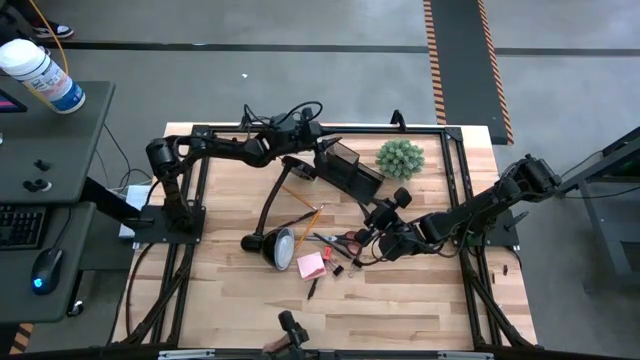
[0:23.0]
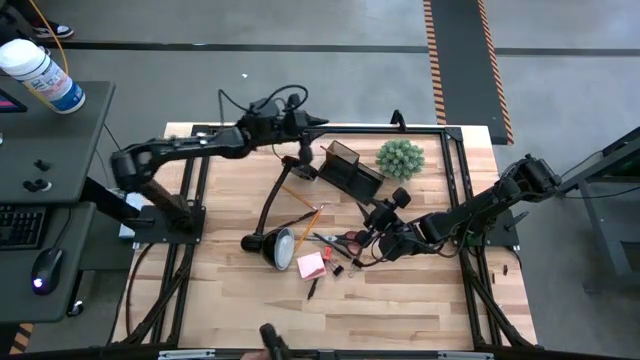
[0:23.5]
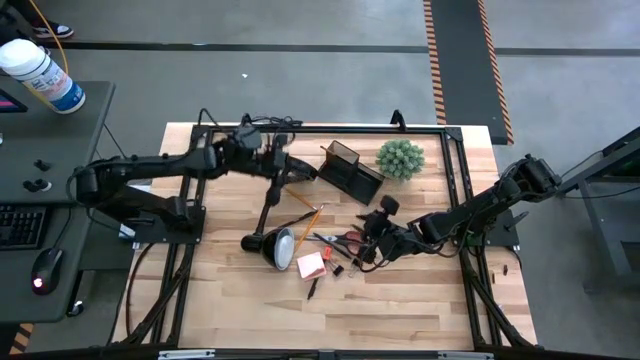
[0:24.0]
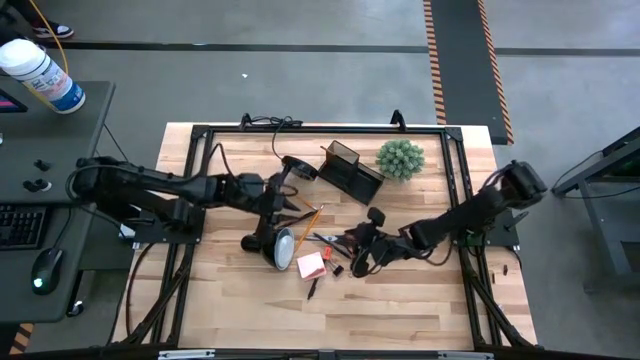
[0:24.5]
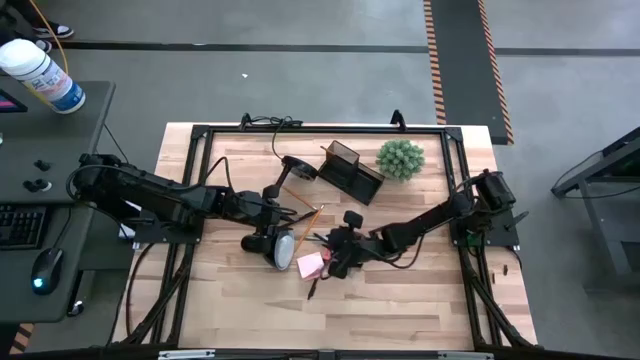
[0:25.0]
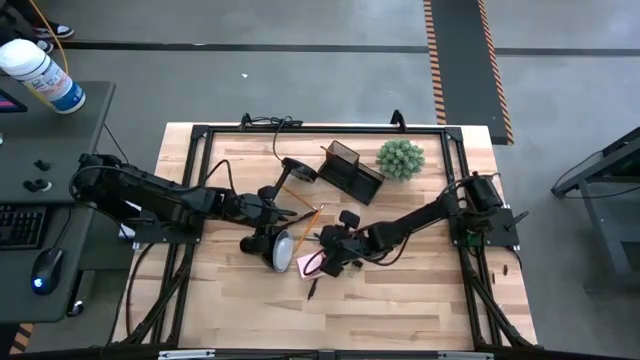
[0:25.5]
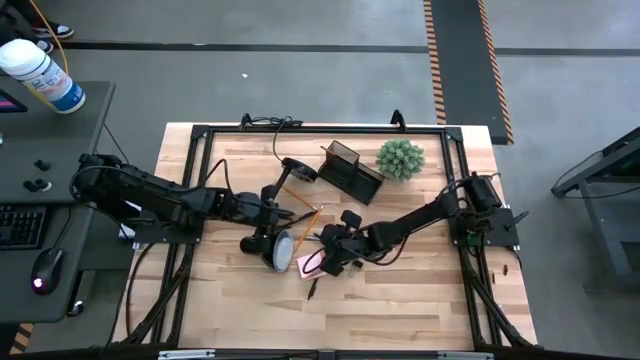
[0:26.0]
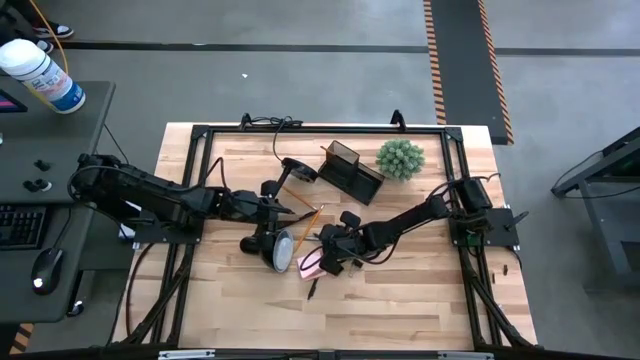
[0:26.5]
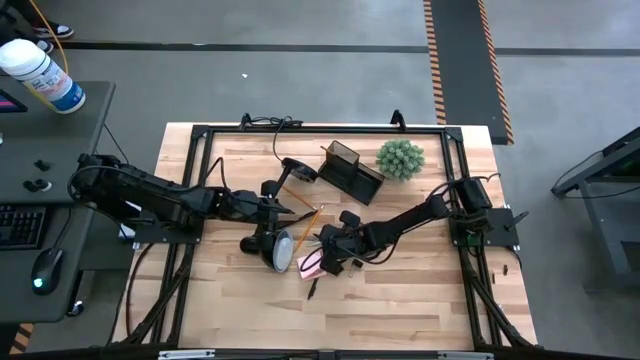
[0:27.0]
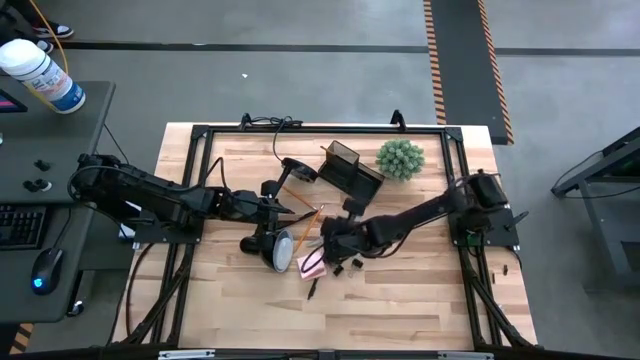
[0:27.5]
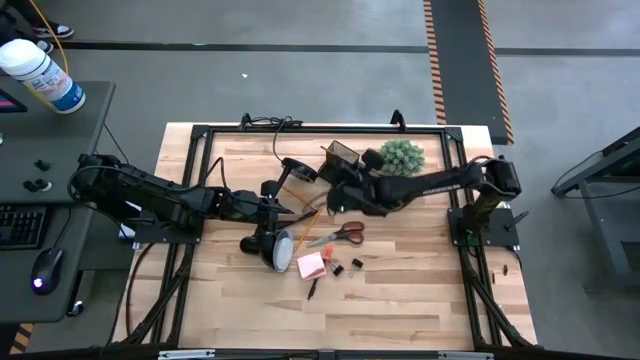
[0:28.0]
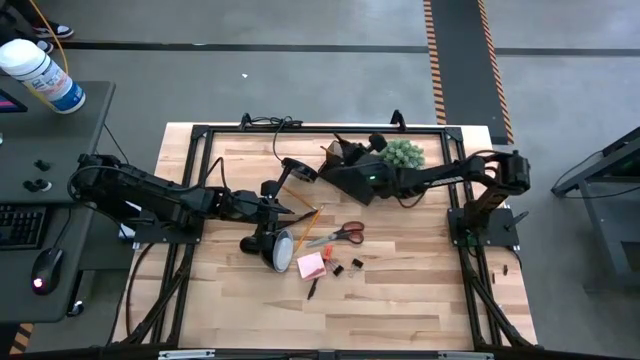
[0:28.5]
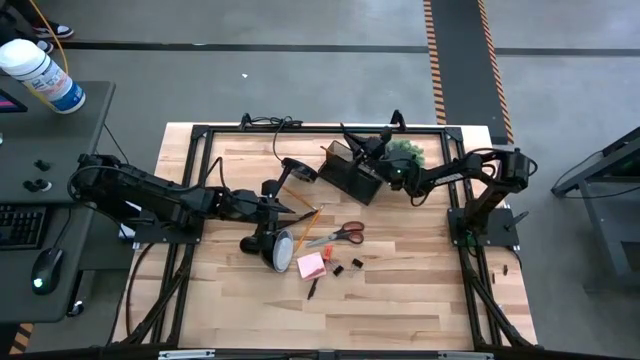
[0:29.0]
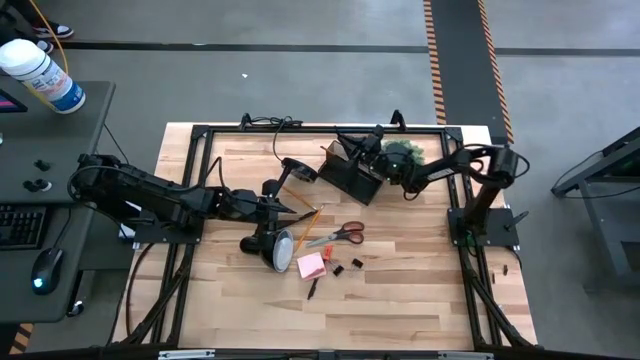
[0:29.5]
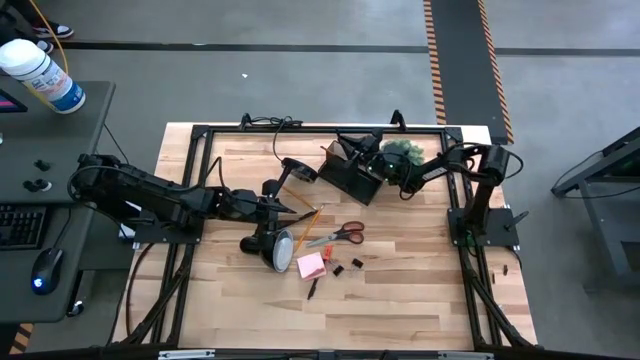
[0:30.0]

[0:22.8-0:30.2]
Task: Pick and place office supplies into organizer
Put the middle black pen into the desk organizer

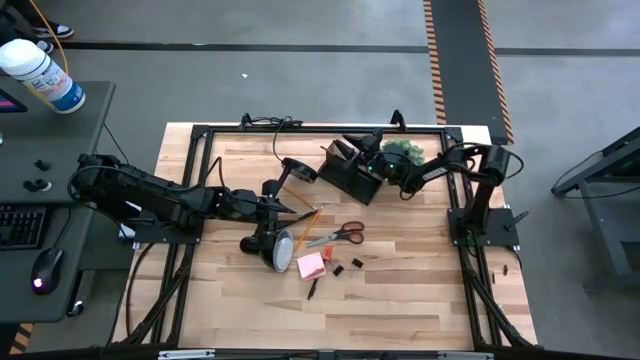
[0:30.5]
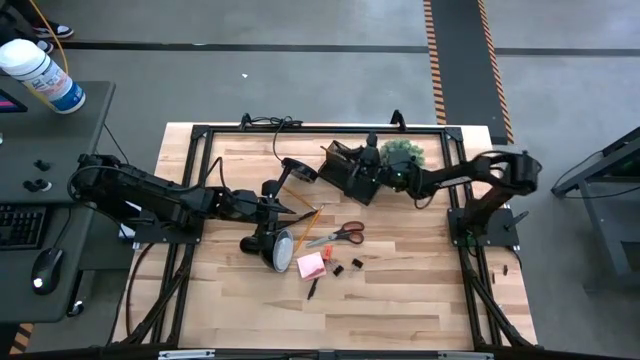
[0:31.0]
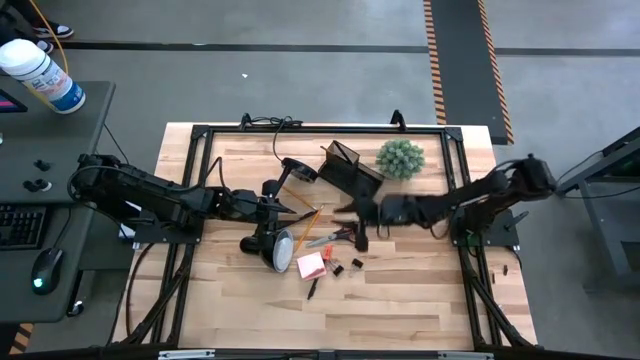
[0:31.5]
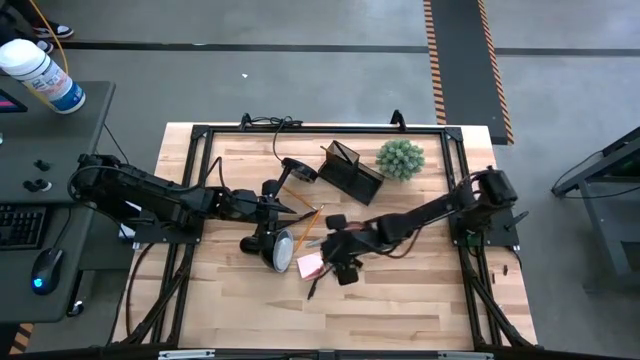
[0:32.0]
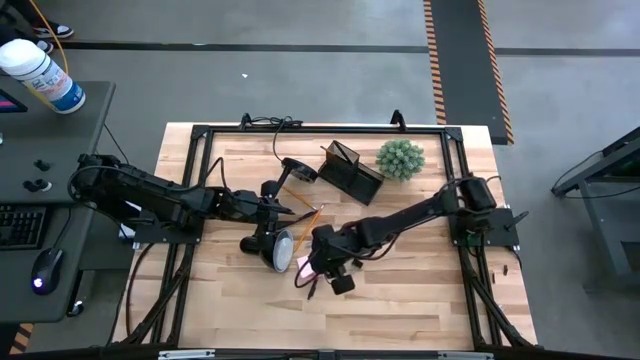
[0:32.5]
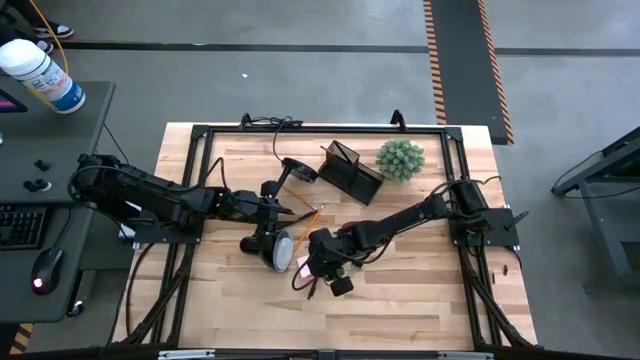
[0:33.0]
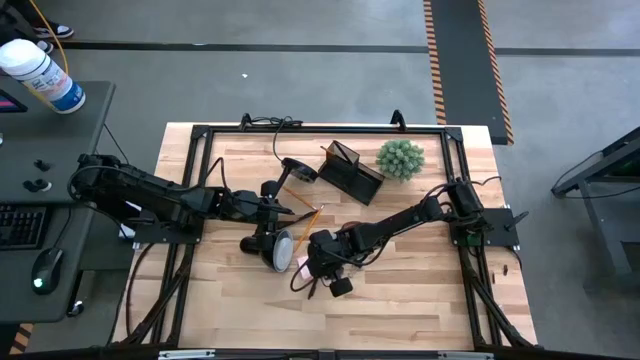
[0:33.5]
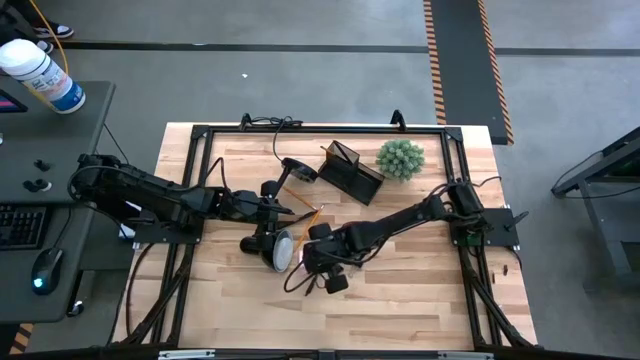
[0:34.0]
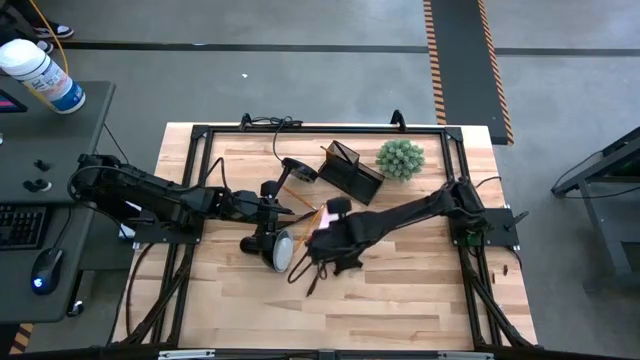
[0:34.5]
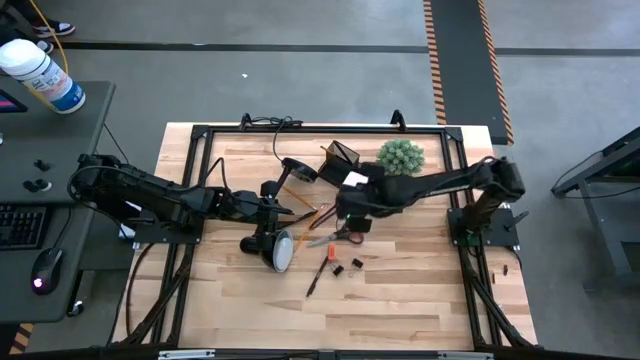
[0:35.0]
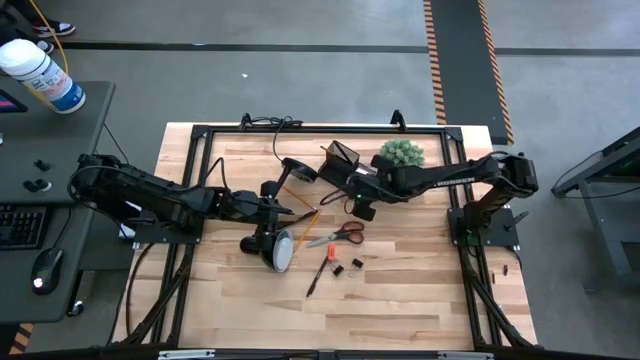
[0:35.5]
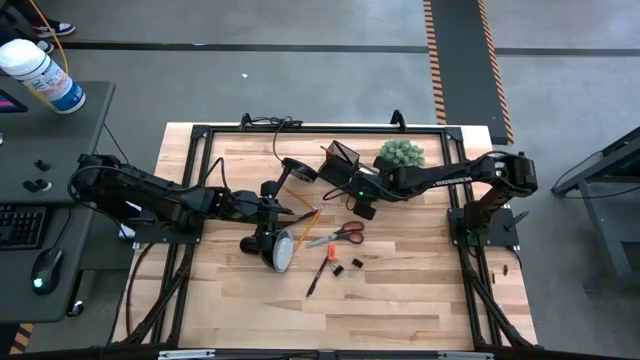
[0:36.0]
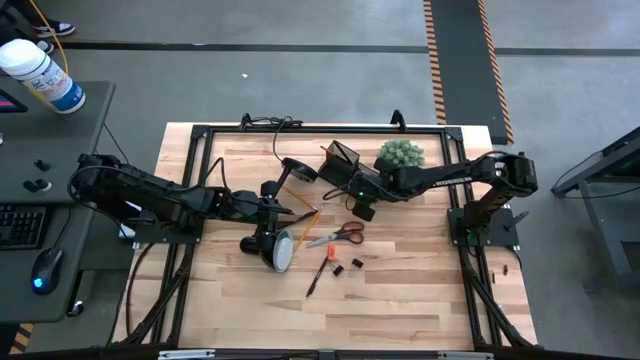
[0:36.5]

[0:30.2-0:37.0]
Put the sticky note into the desk organizer

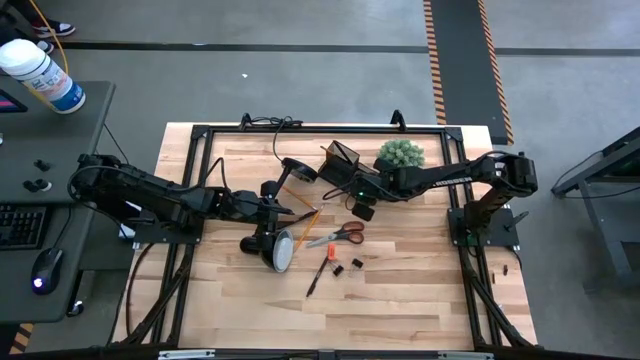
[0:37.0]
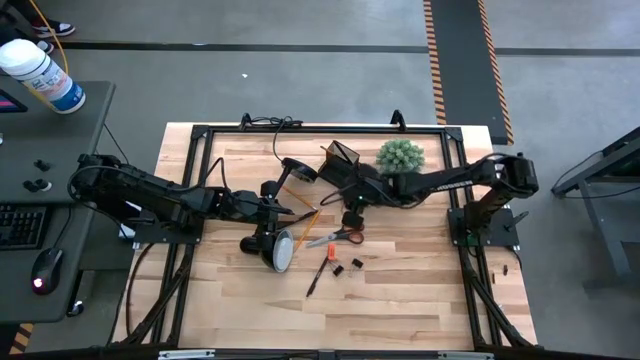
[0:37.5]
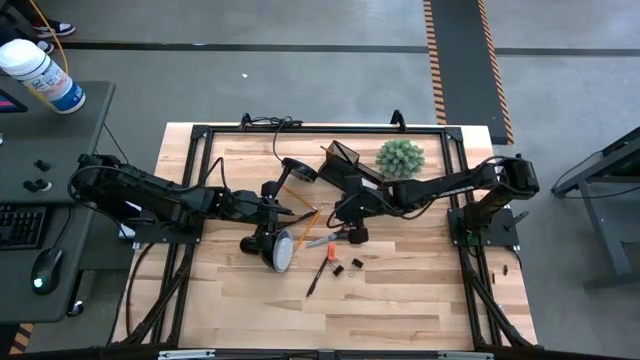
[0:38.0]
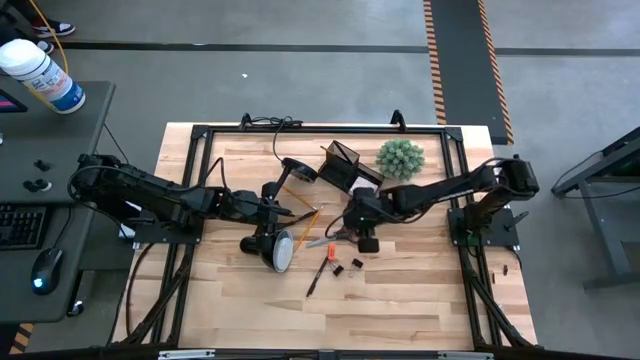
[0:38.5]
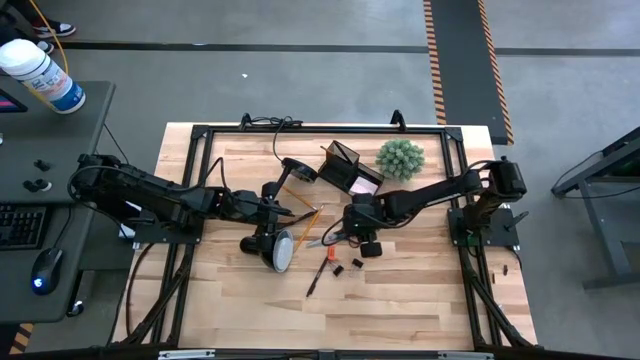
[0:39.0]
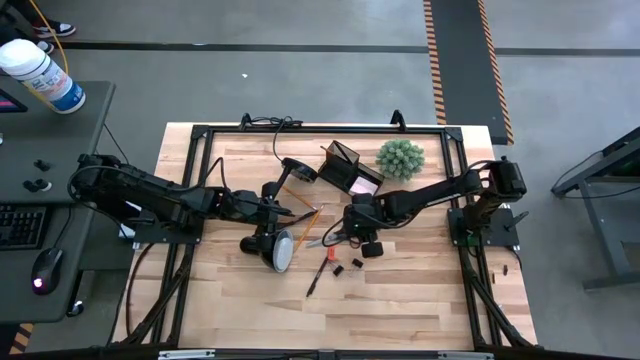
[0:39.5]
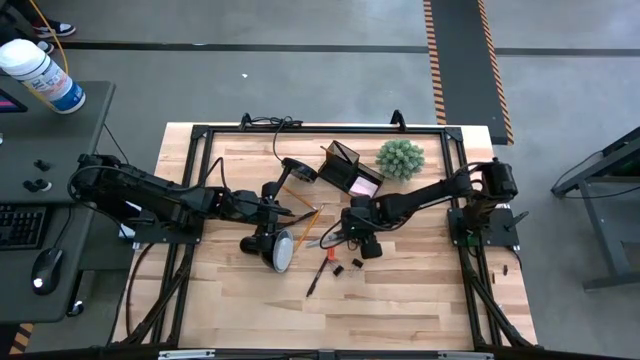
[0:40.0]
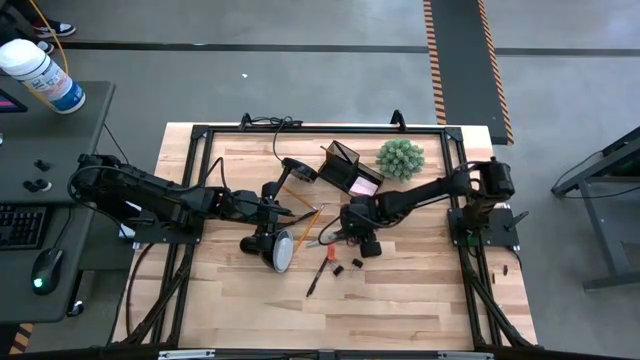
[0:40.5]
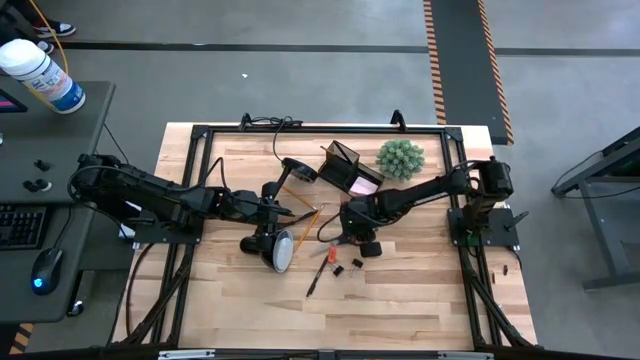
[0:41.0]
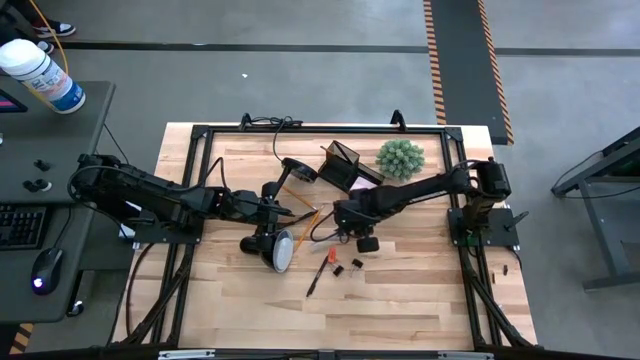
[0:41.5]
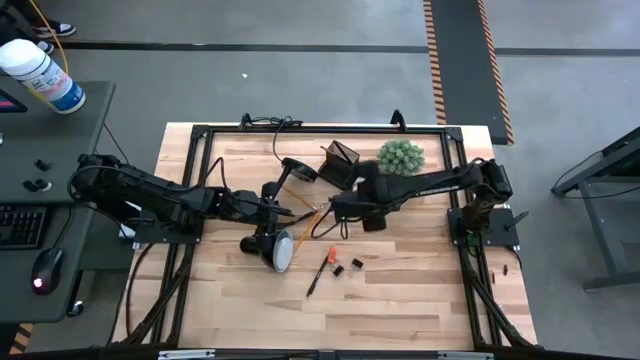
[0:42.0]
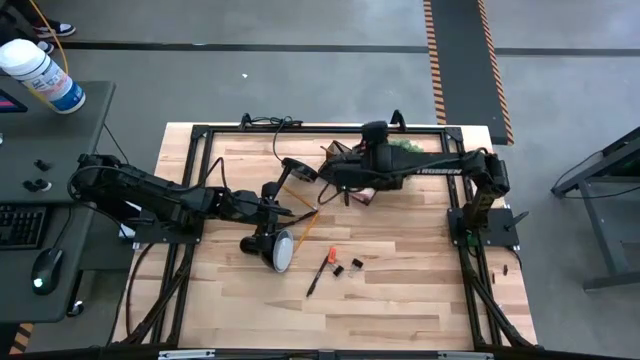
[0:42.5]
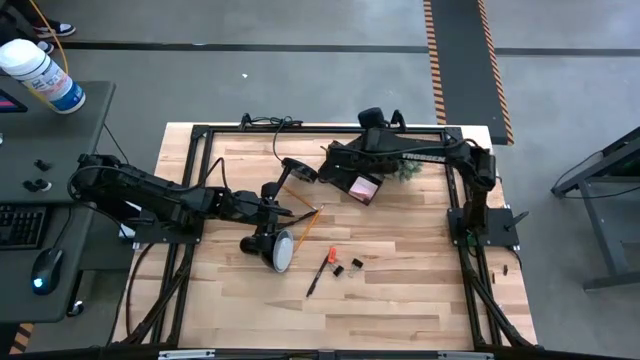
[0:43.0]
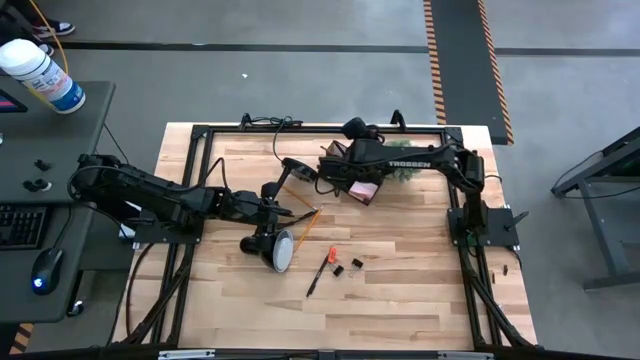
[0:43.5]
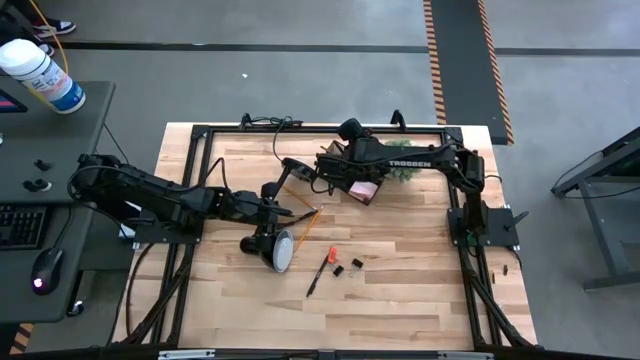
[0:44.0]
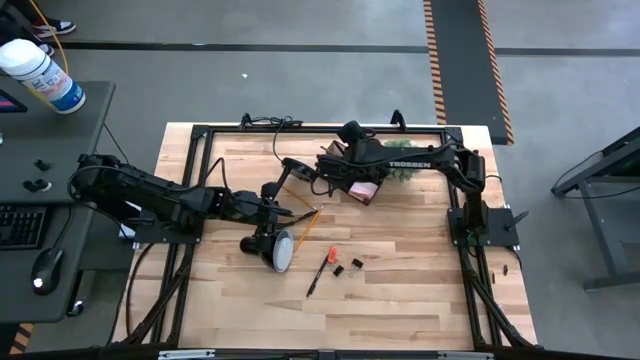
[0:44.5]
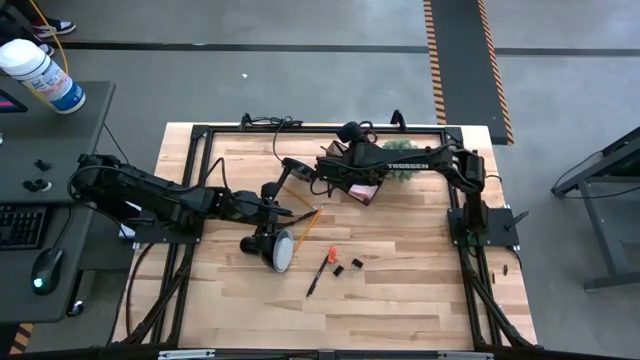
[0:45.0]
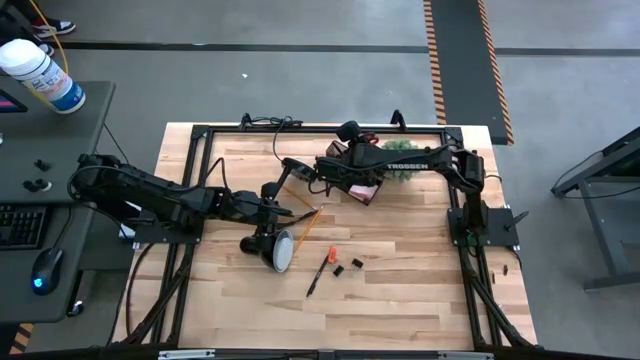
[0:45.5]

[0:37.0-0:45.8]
Put the scissors into the desk organizer
